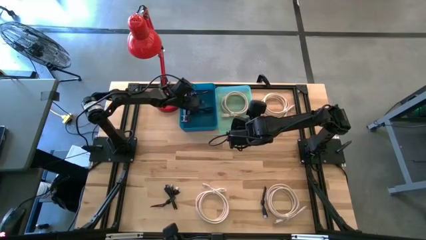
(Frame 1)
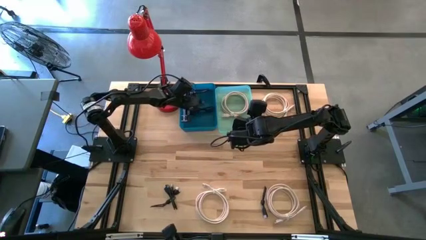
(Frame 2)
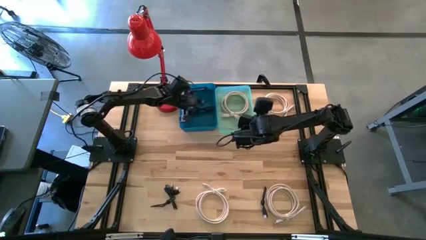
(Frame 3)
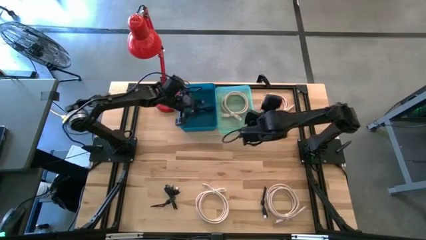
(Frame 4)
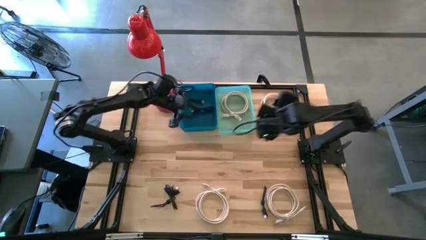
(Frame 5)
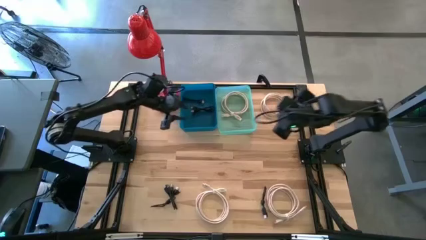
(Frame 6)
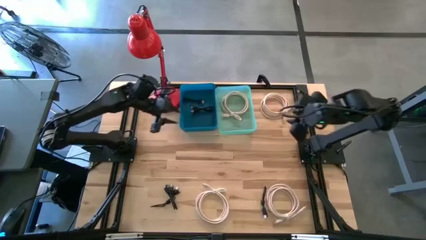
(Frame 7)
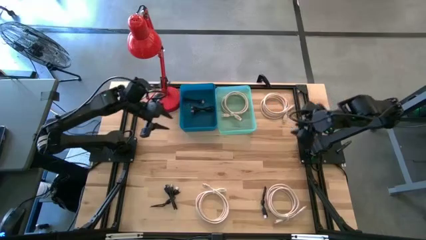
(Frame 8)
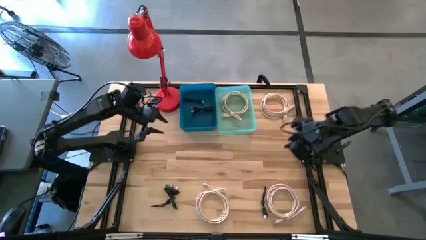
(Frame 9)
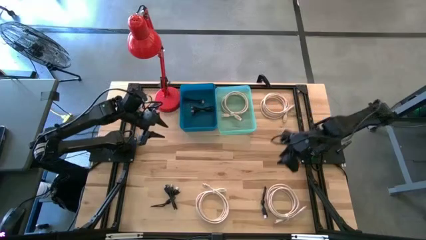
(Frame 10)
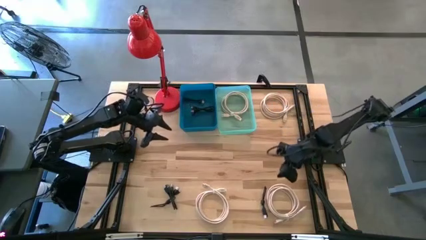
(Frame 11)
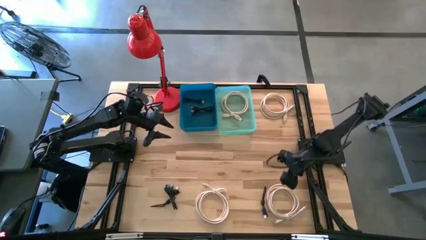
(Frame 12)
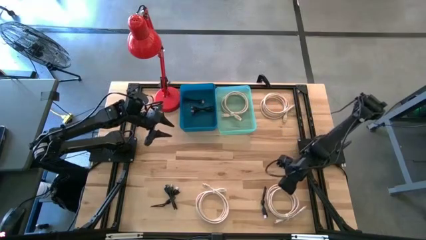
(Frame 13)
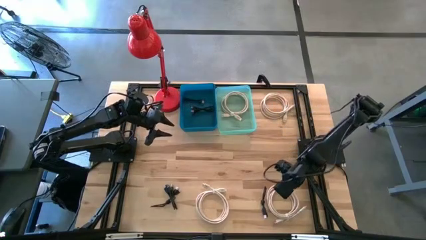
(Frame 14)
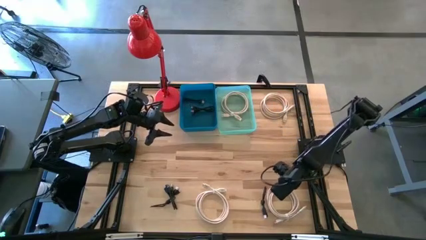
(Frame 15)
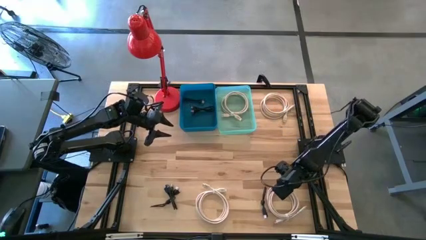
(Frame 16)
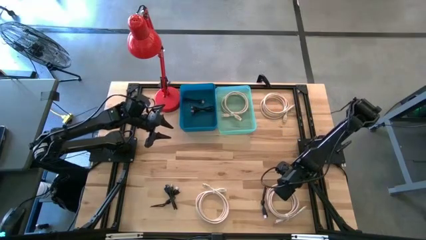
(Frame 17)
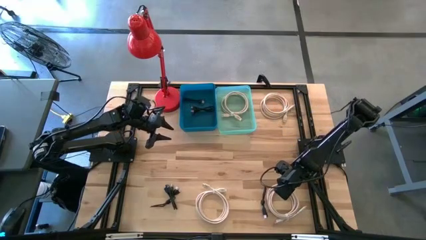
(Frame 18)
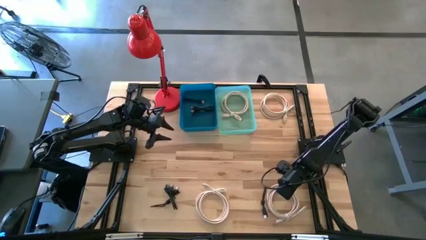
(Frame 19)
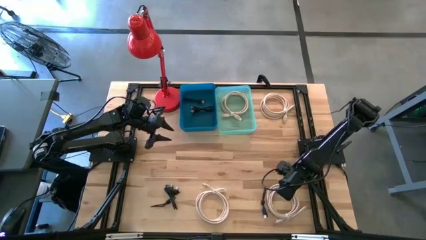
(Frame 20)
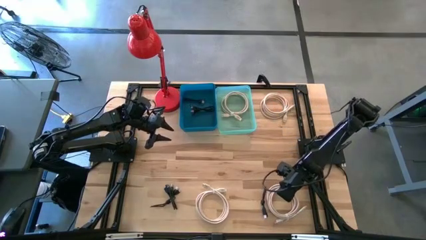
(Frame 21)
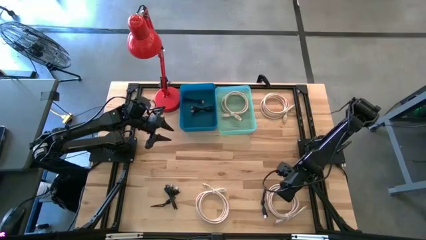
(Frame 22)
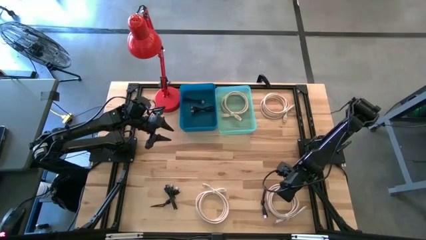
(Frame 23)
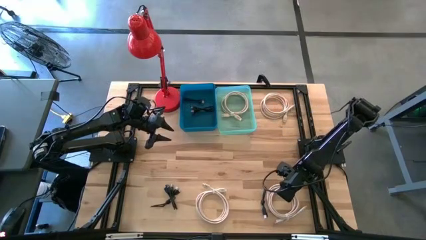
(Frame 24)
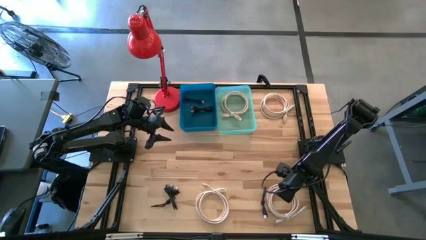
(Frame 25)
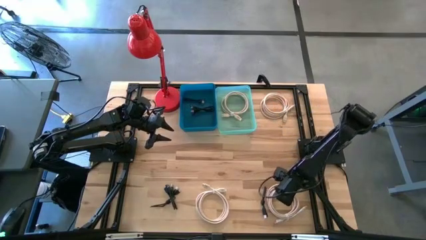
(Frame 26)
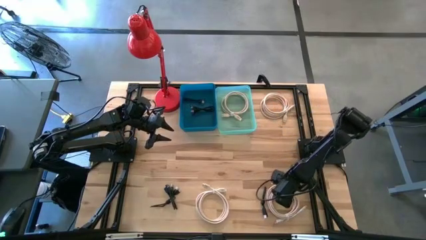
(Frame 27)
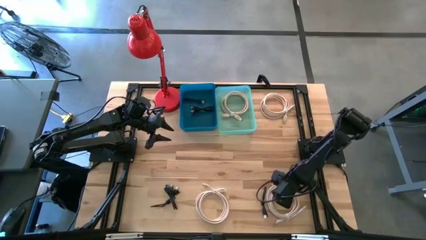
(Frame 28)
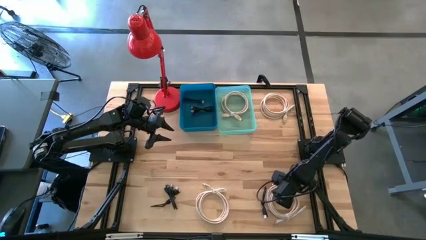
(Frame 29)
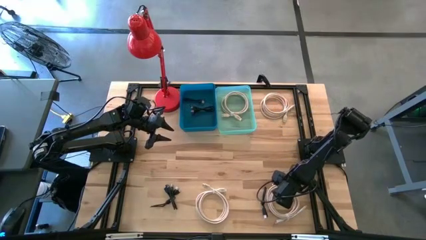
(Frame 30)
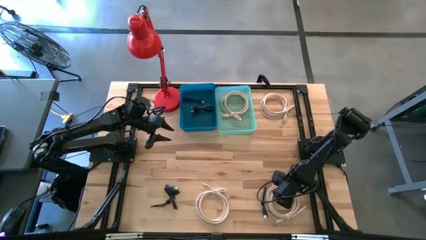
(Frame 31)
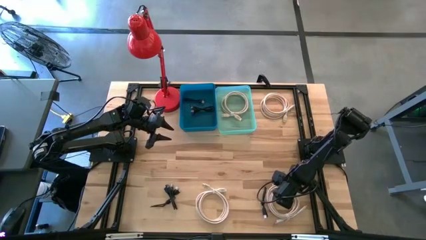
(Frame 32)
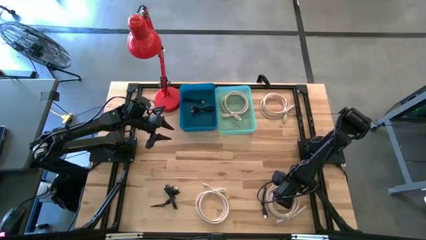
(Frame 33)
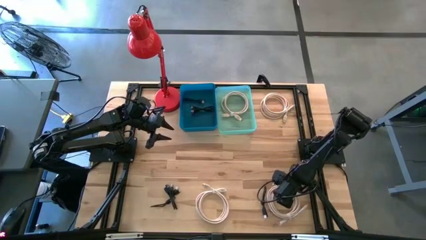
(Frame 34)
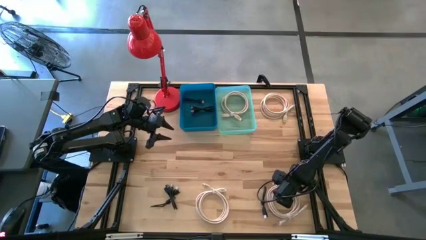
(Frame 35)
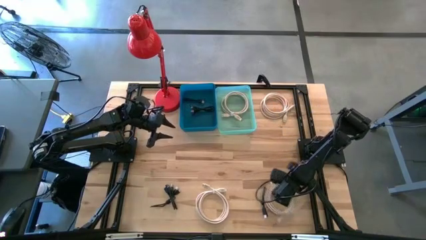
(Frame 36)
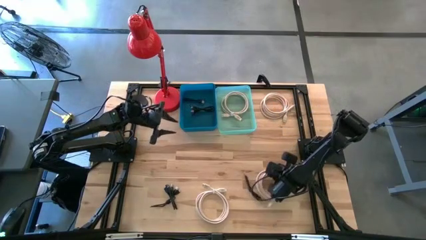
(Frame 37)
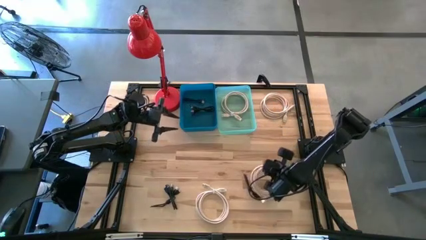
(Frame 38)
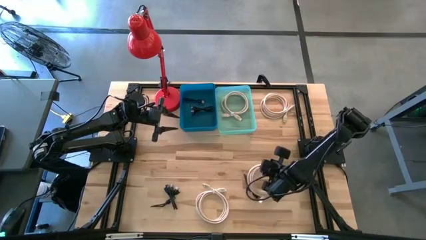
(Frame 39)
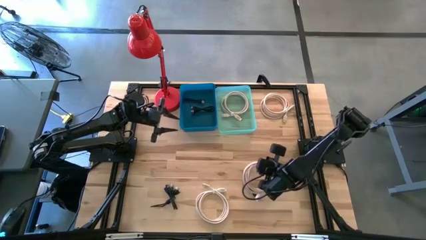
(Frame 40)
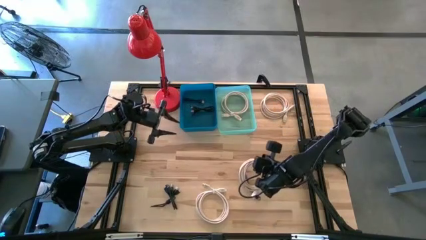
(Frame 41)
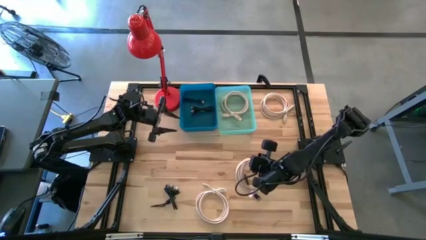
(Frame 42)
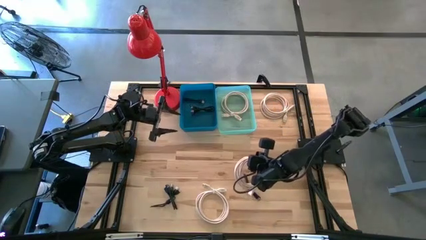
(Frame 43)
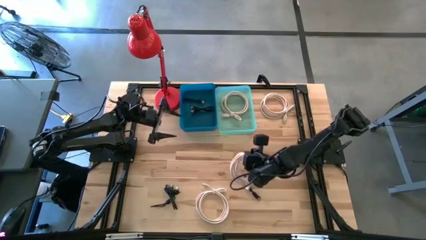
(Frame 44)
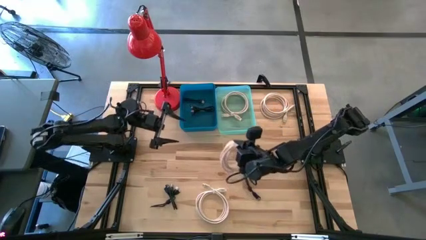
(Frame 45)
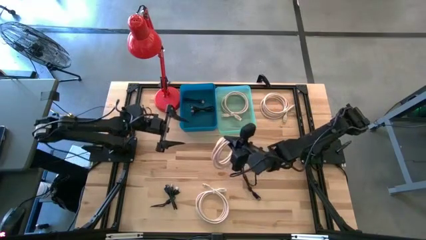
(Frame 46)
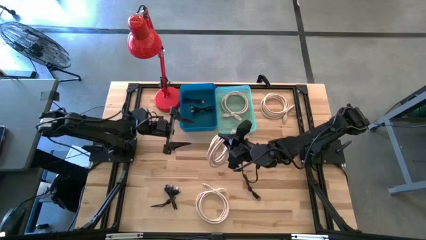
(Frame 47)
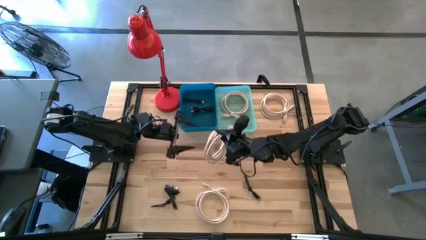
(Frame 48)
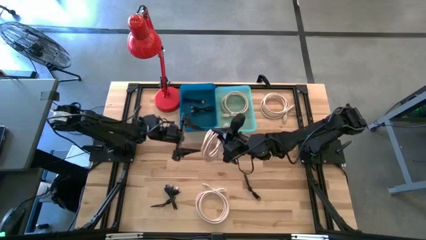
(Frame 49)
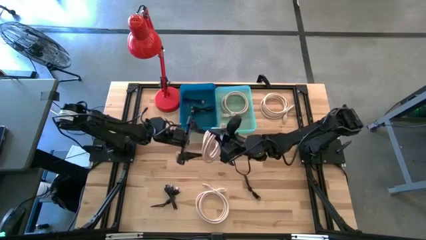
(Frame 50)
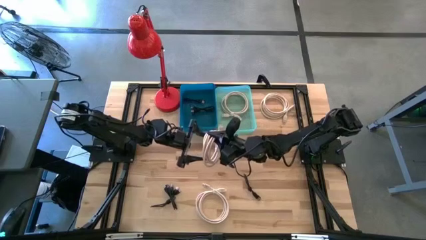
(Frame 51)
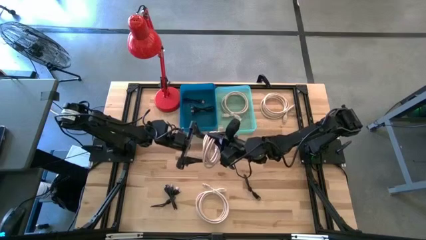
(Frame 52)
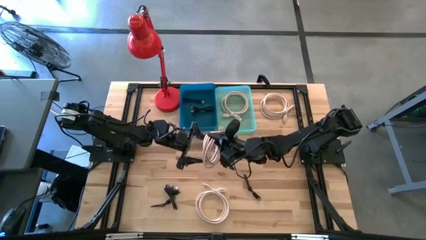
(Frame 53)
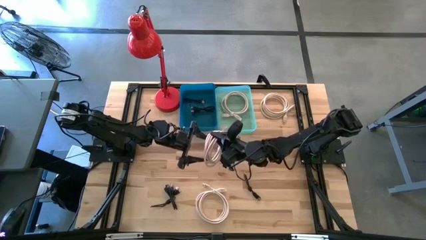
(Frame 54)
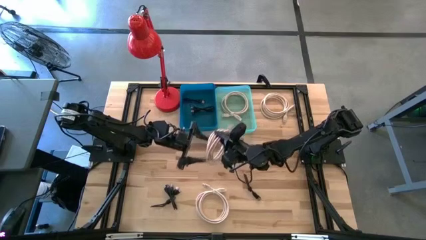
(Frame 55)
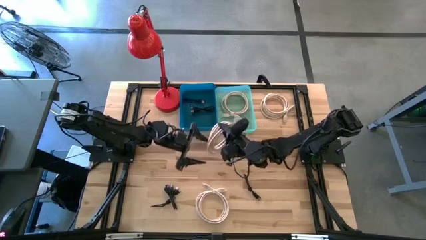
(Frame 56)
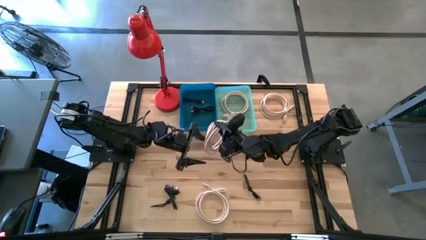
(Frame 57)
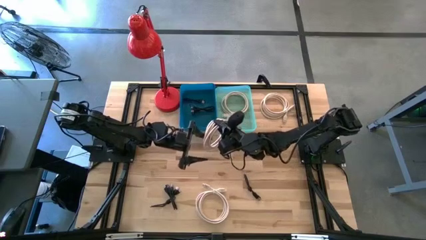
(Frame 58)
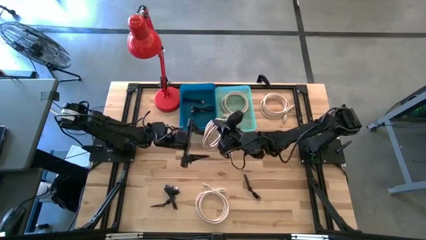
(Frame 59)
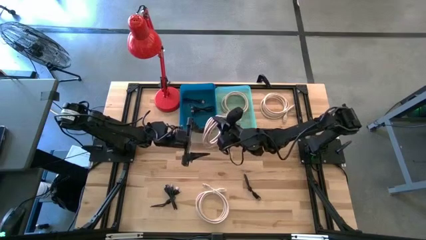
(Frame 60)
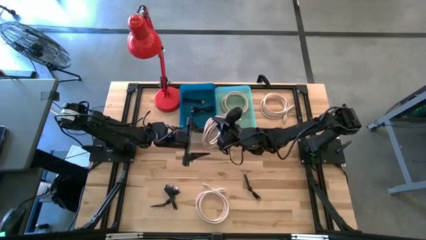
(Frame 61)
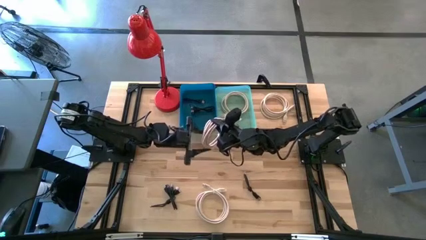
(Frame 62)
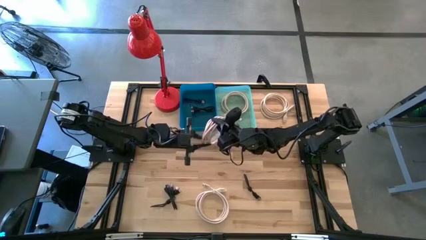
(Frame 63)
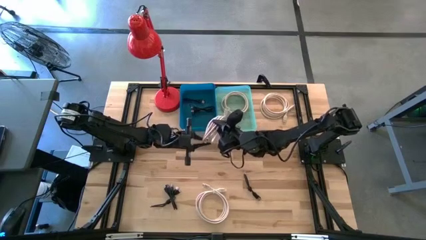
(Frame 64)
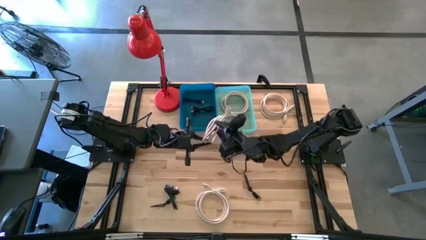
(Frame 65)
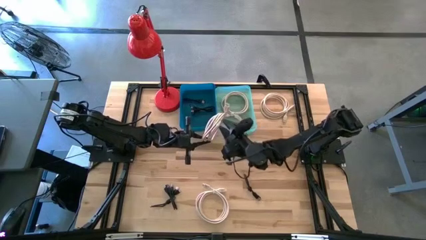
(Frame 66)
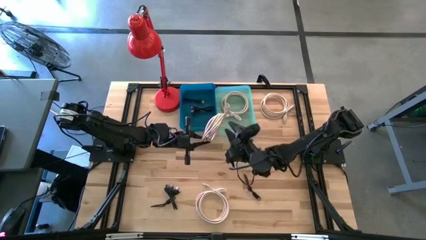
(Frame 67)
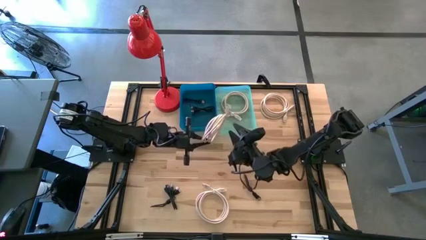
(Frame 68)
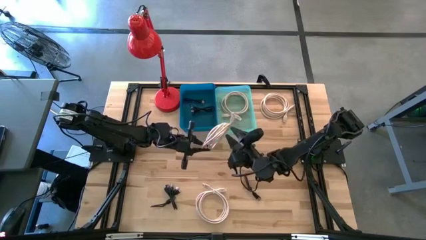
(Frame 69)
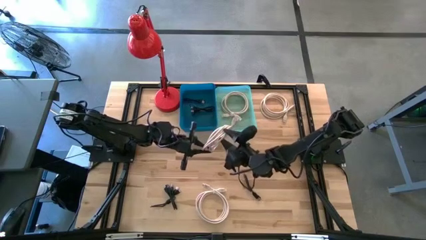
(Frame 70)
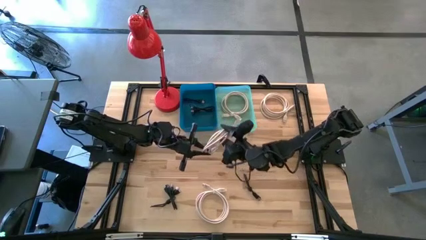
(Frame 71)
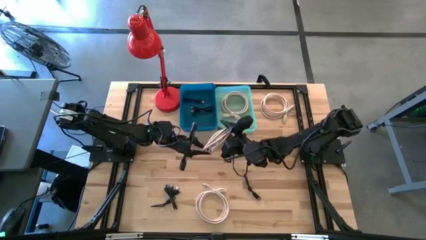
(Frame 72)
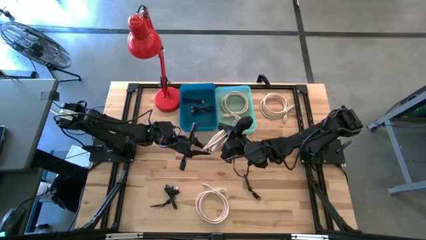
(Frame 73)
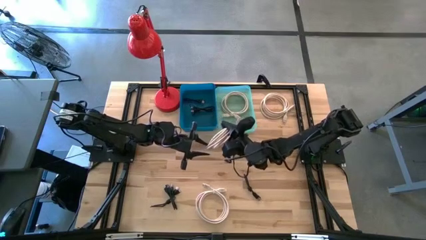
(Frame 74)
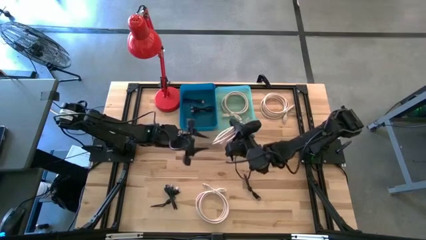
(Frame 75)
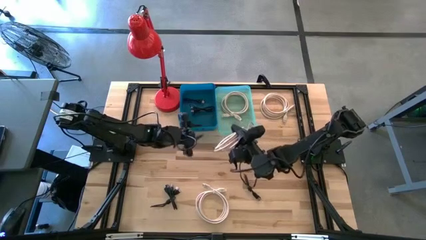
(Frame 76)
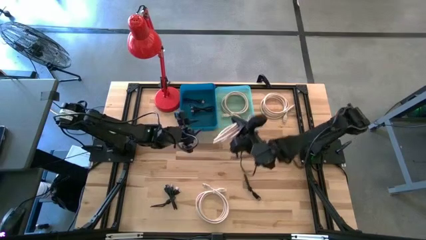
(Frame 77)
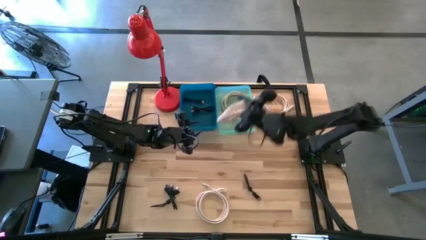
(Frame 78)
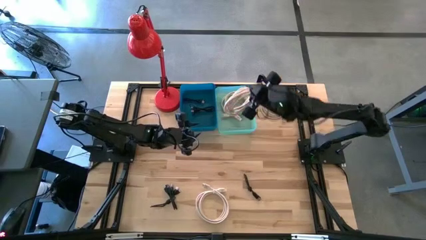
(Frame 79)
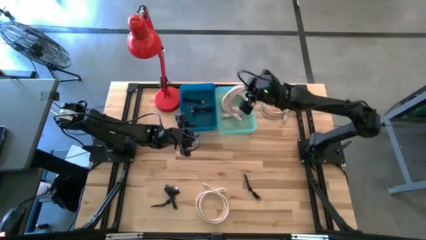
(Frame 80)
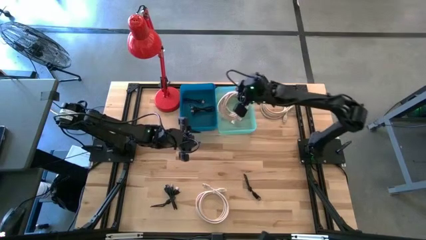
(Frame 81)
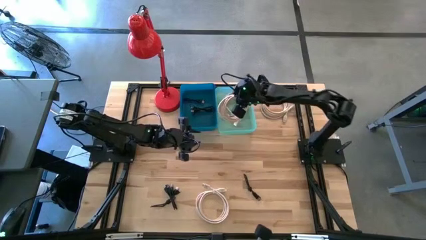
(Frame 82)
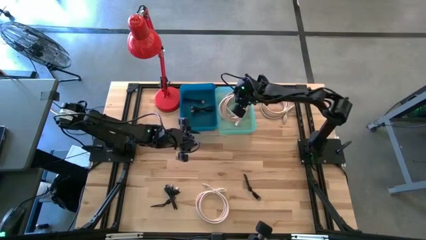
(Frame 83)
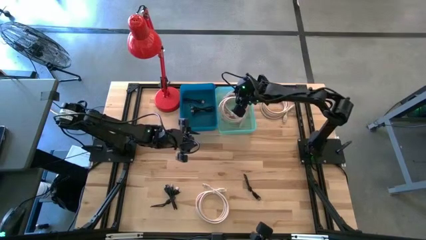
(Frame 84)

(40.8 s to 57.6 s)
Task: Pick & Place USB Port
Put the brown HDMI cable into the green bin

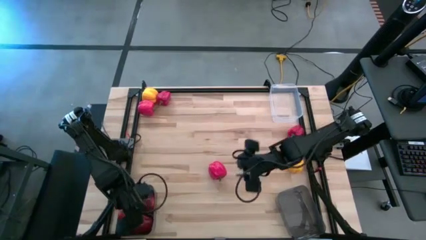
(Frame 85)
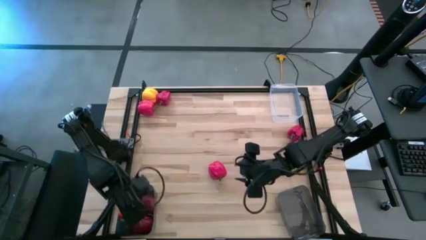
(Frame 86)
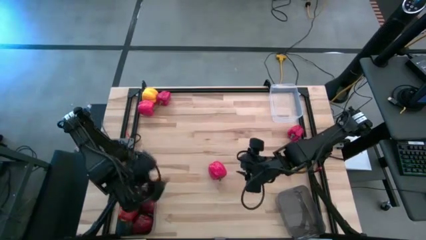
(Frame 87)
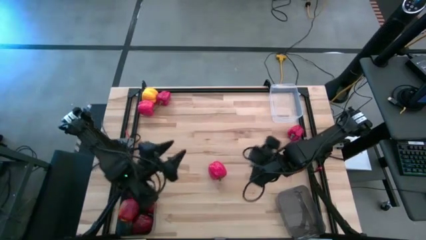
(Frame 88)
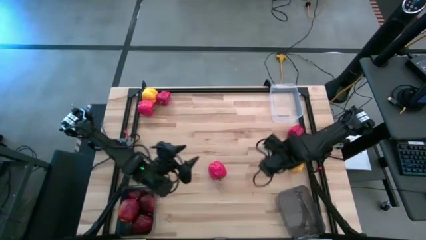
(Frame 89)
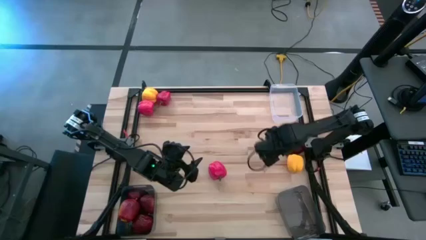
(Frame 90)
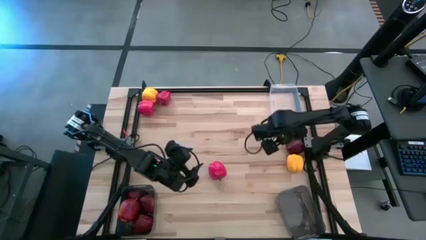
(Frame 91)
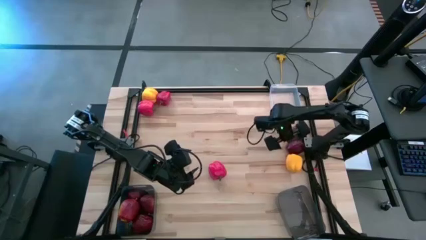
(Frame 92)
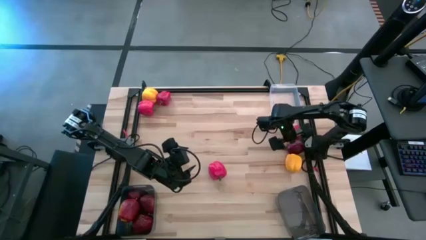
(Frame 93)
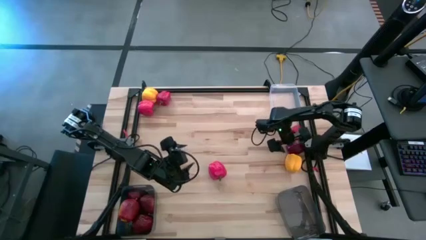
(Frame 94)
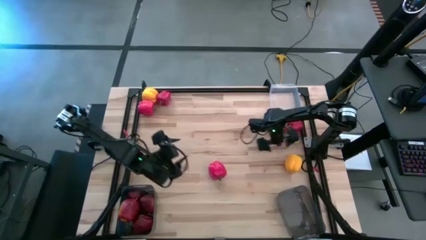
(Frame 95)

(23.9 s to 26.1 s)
Task: Sort produce into baskets
Put the dark red apple into the left black bin
